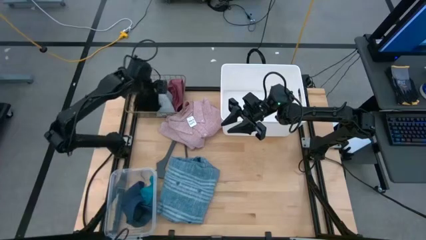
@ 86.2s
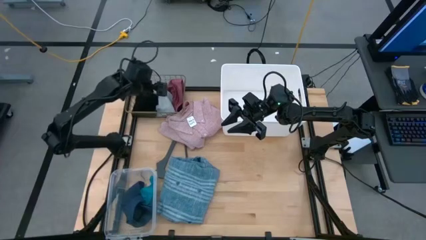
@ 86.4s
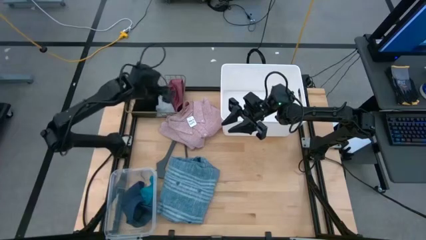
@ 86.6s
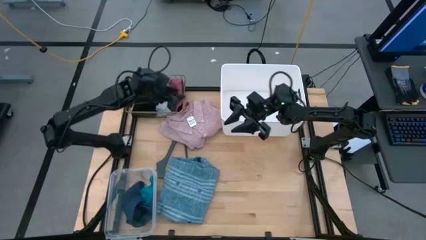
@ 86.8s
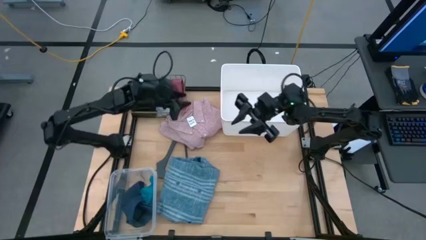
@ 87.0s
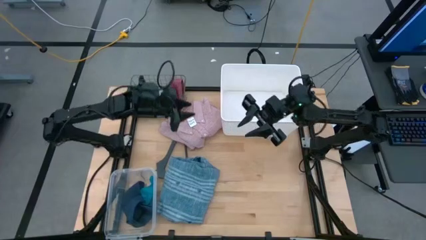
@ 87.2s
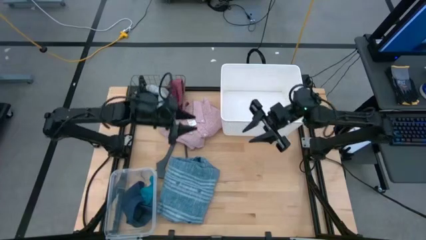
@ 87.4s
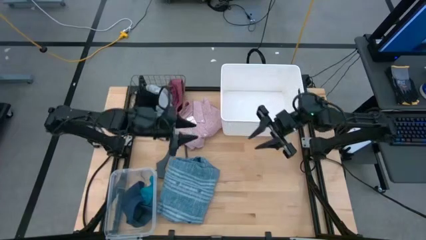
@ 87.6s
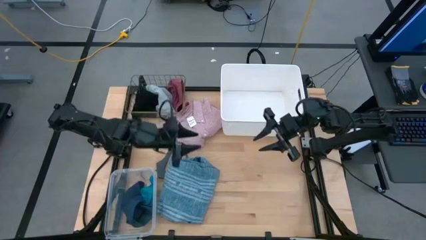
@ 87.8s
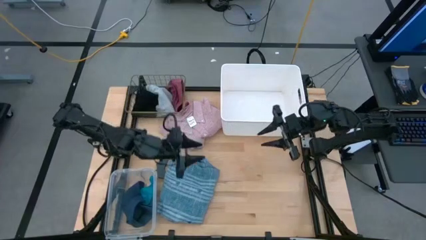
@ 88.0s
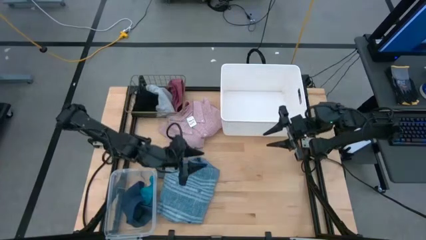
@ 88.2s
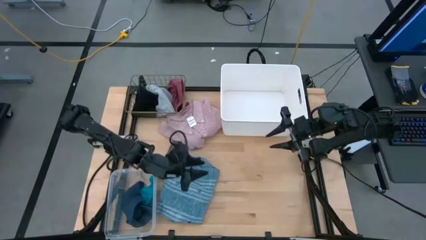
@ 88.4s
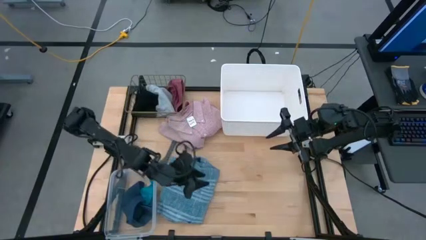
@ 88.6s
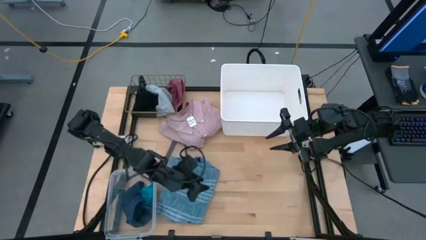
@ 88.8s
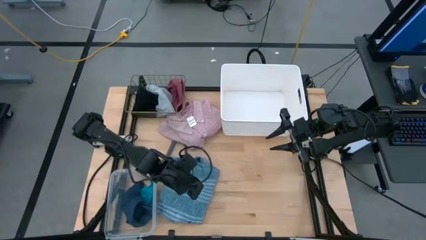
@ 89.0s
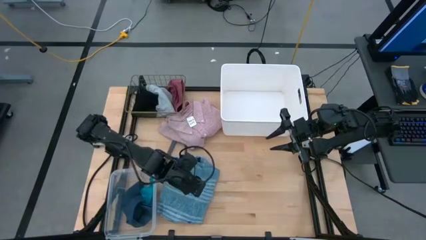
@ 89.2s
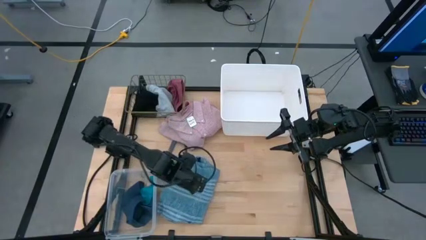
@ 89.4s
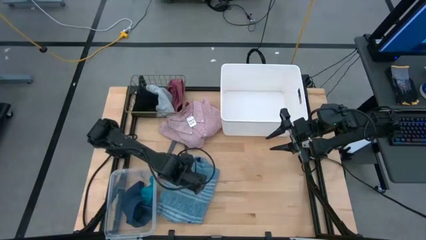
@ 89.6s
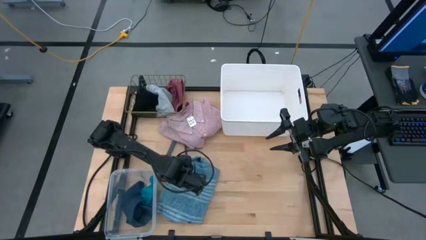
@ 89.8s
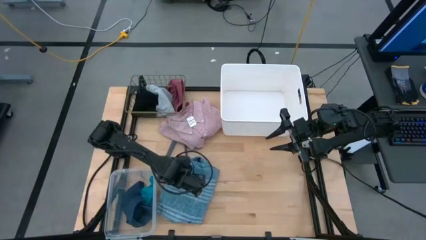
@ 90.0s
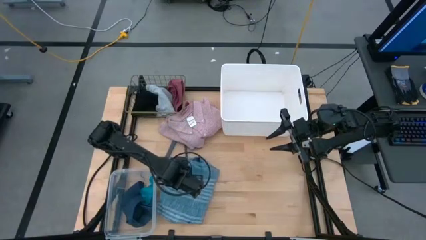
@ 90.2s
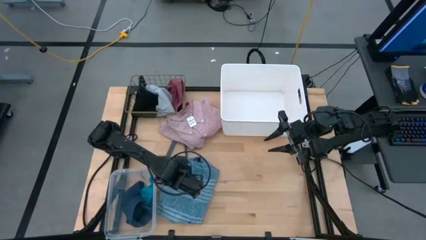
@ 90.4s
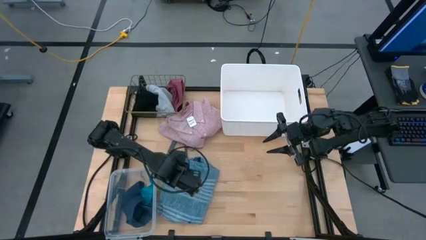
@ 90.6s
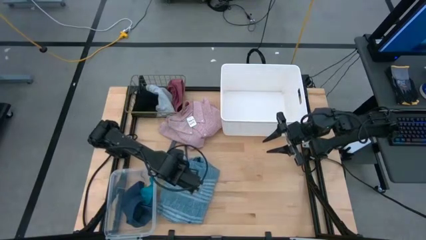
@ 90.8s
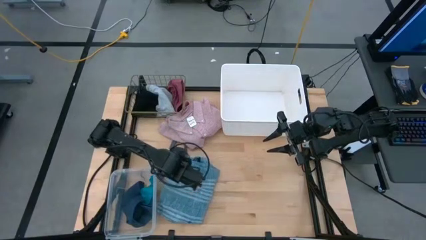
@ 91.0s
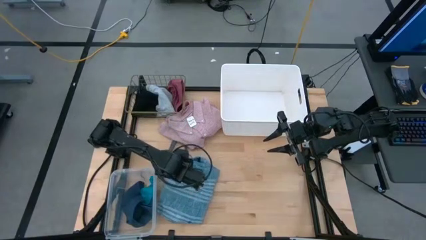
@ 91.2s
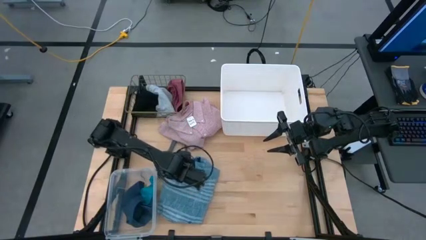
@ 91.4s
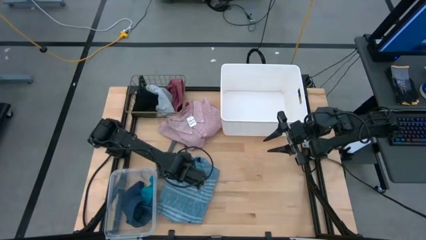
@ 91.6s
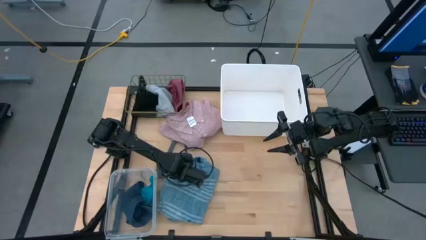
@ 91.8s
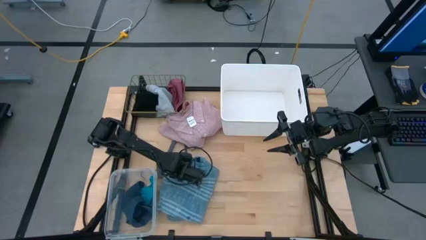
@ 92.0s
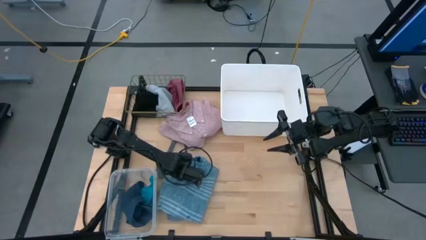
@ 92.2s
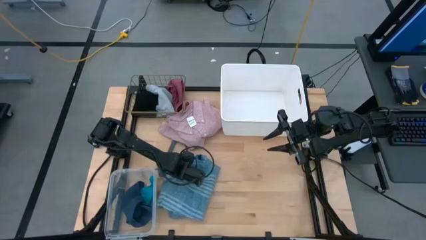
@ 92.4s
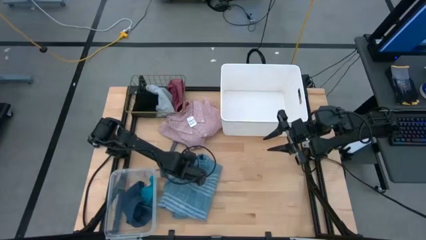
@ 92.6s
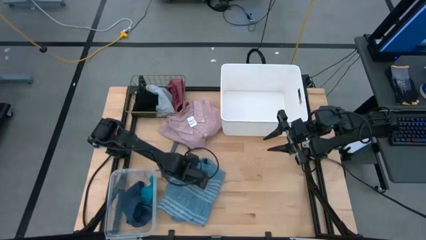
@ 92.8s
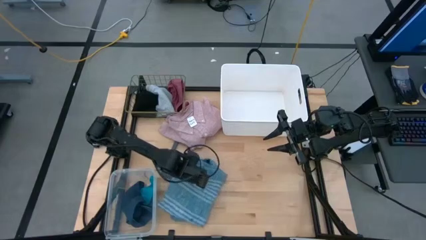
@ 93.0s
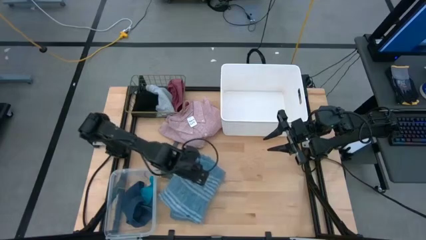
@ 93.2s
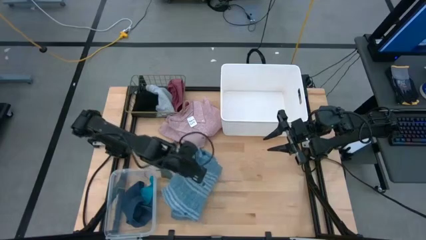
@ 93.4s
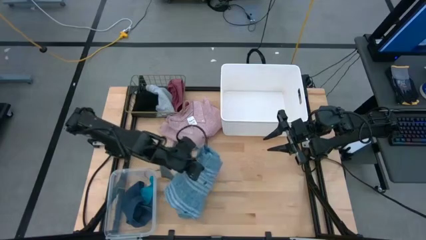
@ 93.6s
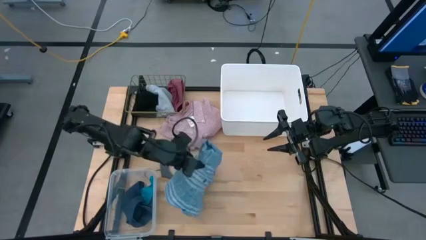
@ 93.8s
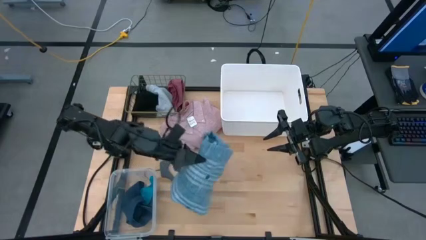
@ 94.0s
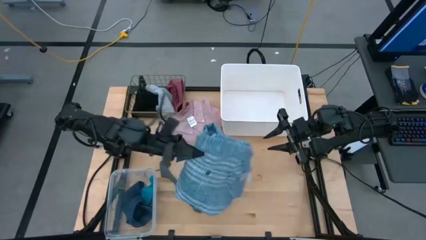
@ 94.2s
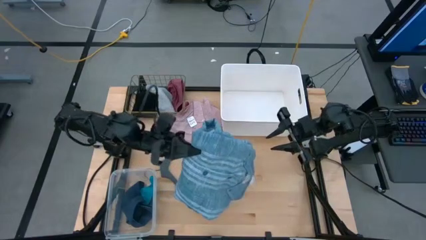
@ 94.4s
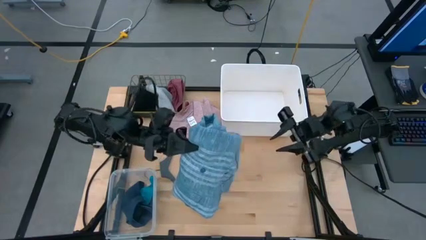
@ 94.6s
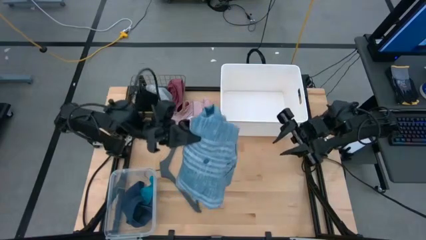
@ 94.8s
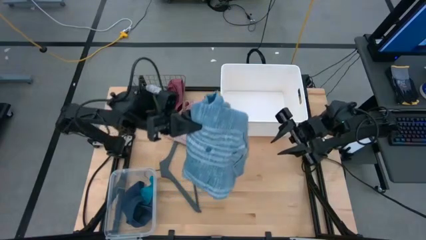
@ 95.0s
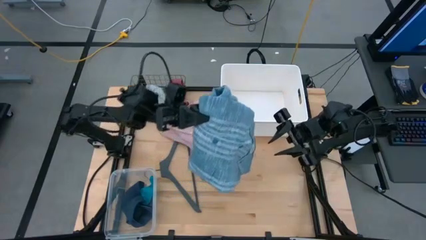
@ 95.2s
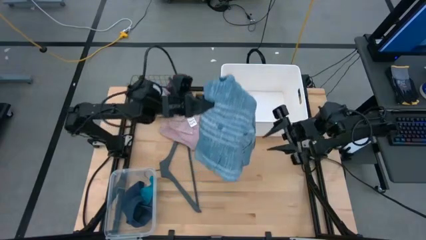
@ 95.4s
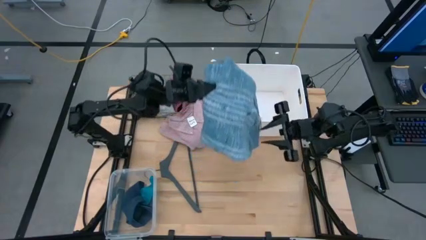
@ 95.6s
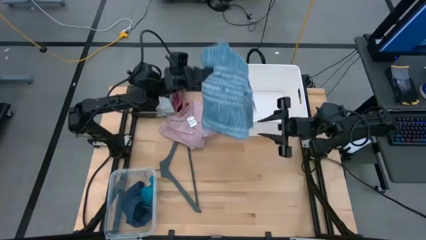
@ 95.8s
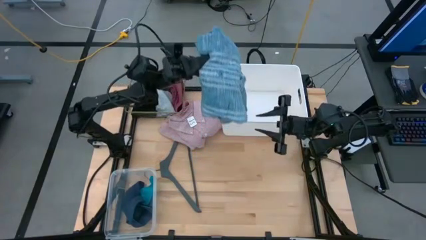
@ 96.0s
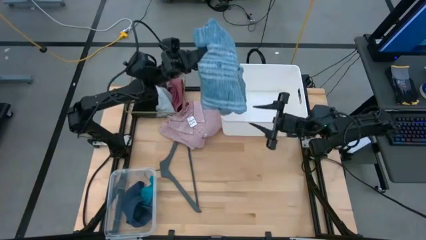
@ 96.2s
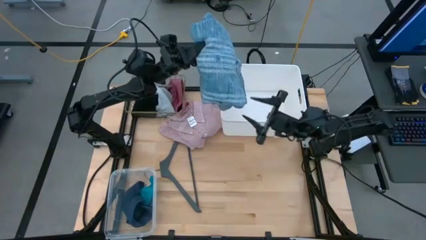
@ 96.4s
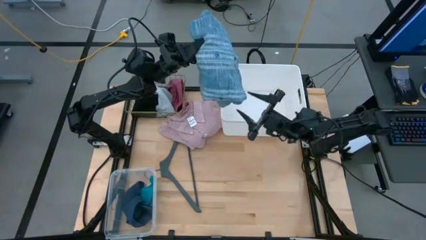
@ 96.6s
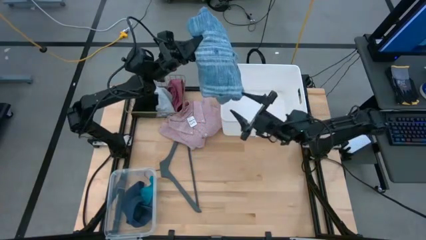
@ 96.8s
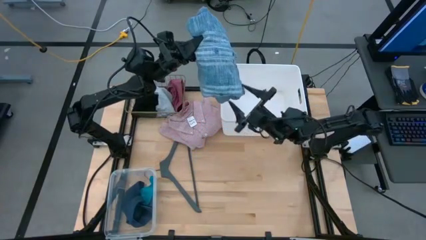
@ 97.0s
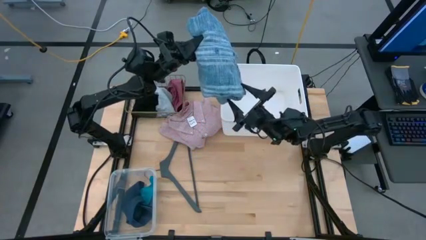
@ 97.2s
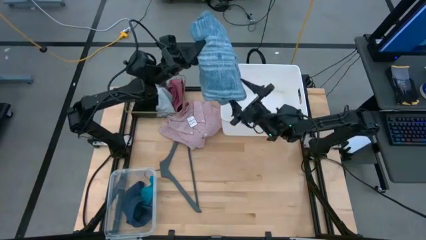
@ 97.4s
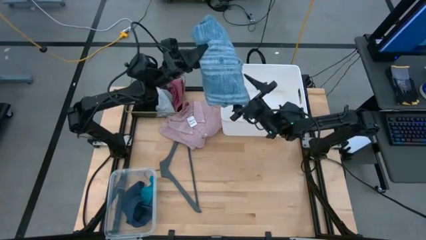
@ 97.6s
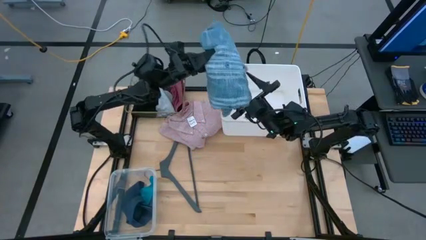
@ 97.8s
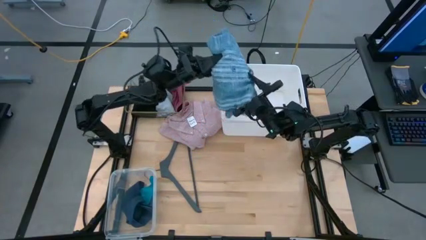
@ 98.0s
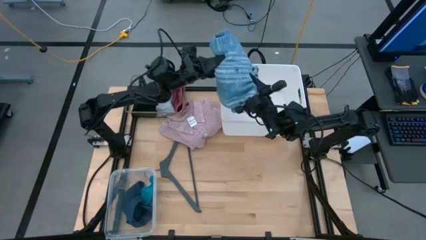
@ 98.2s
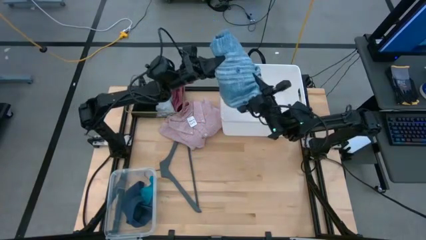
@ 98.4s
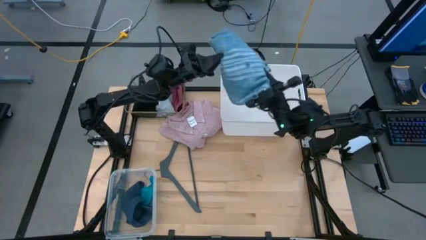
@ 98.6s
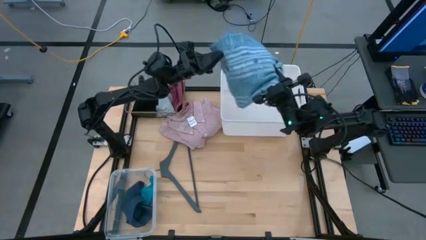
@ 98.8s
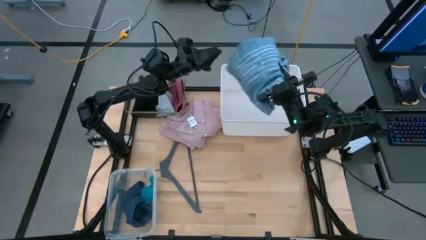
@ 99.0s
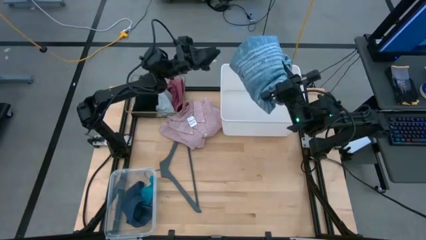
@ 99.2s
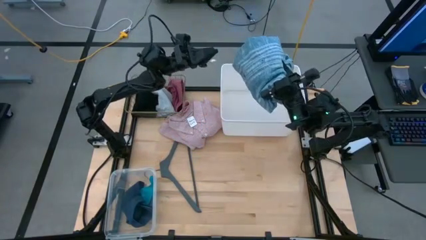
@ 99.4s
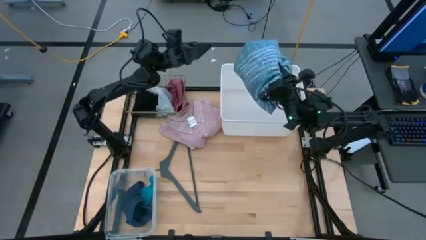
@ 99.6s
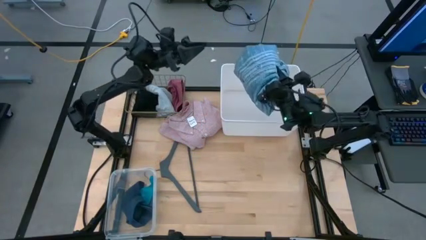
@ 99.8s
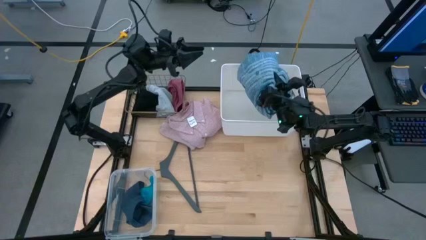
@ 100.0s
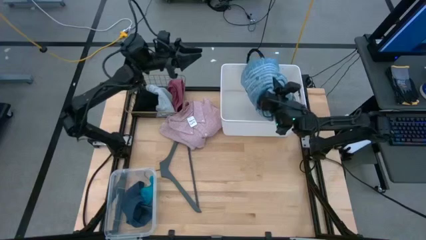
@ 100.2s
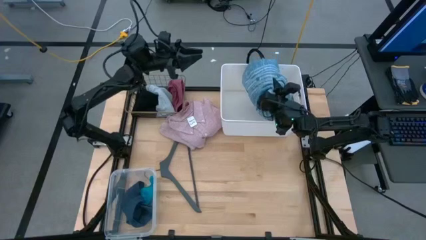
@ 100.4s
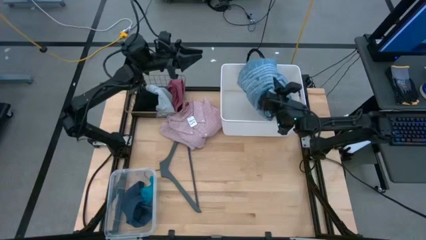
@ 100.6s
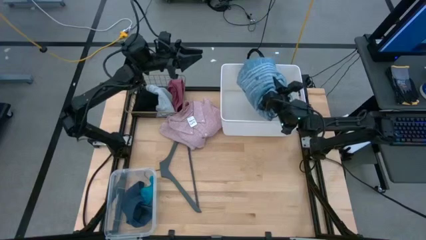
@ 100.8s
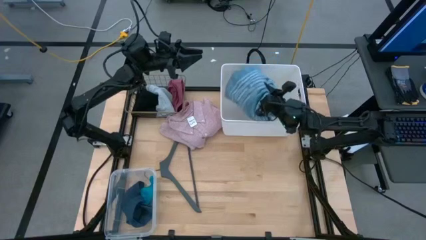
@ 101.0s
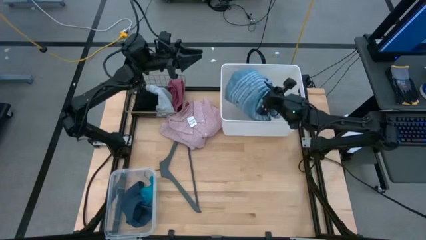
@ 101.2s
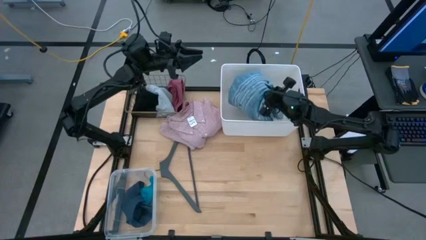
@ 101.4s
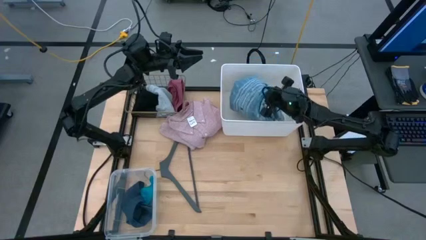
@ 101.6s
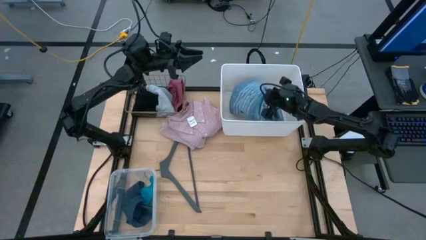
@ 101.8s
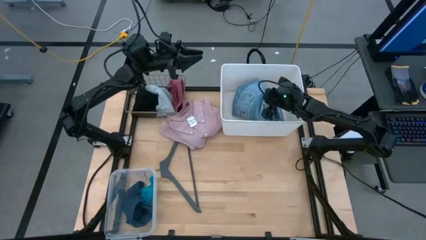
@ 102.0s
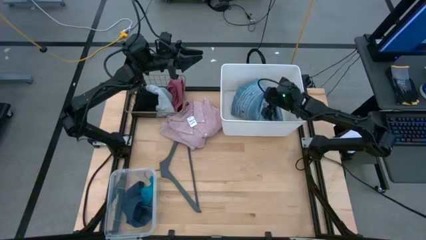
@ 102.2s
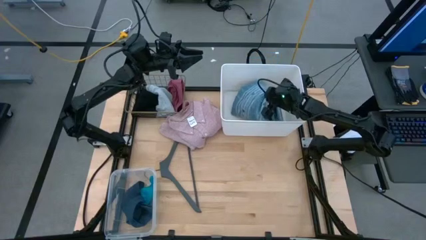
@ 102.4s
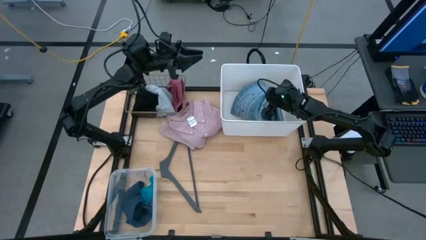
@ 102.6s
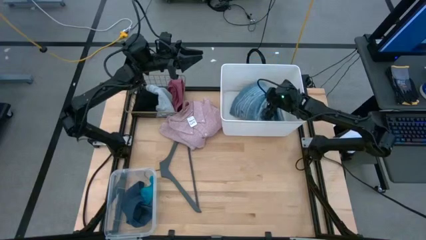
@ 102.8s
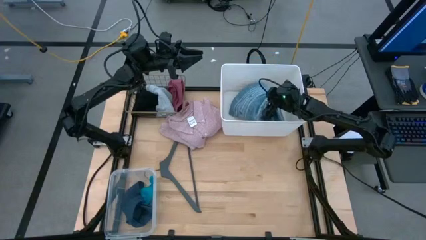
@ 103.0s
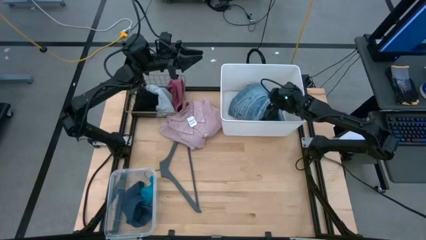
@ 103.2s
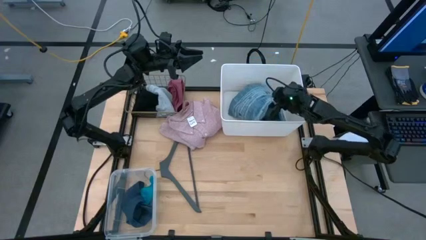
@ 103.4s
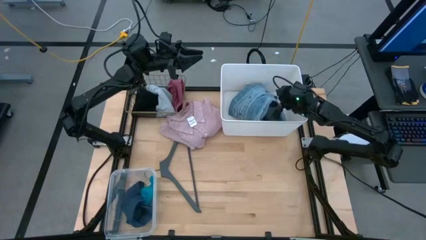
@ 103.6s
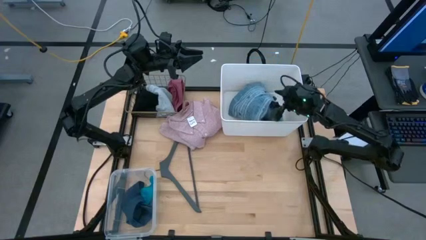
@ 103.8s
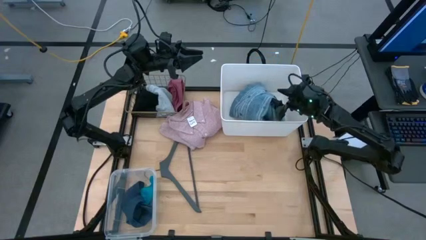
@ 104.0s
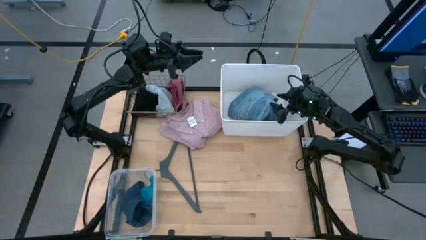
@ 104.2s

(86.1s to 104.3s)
Task: Pick & Place Cloths
Put the blue shirt into the white bin
